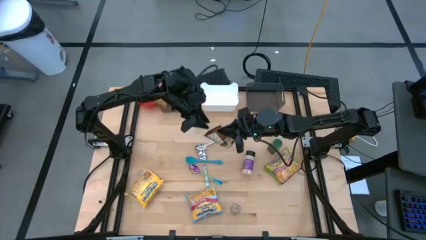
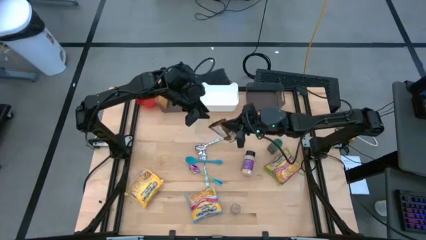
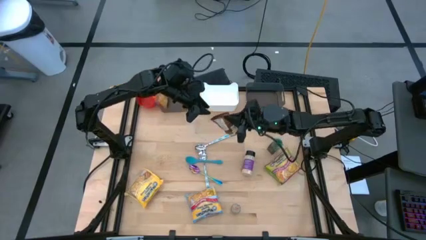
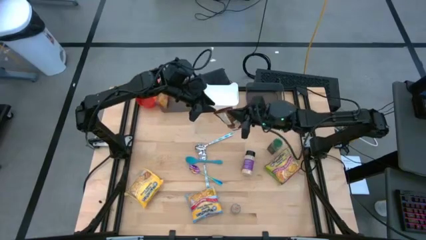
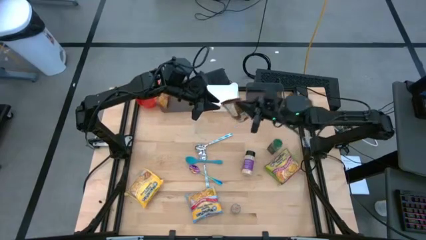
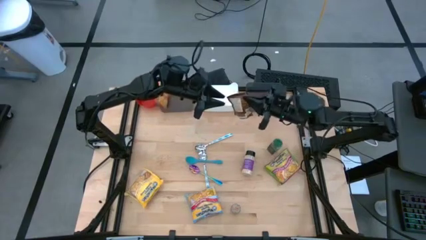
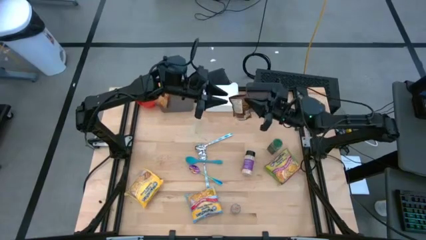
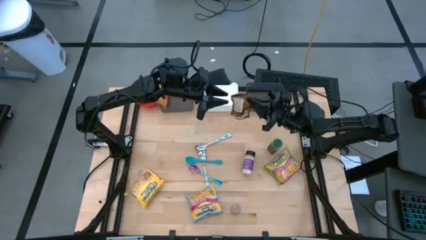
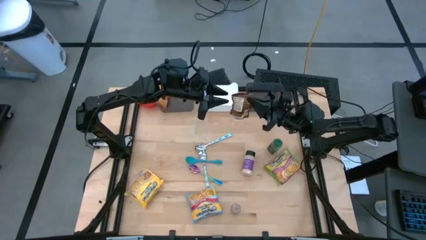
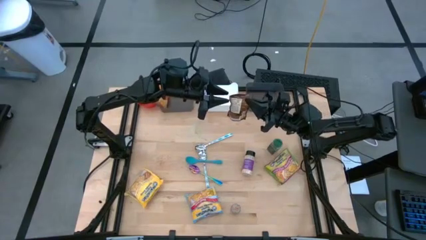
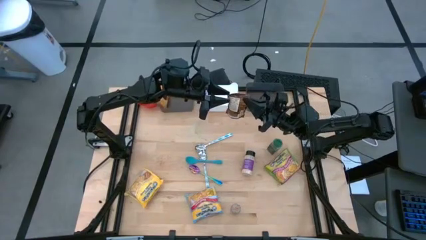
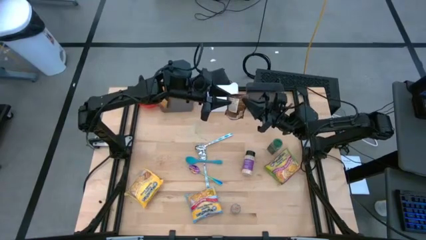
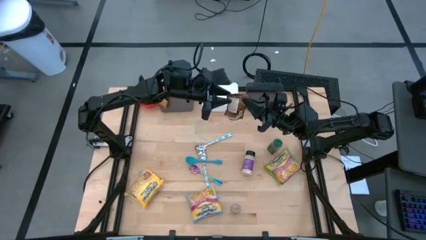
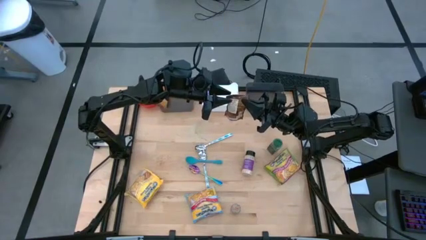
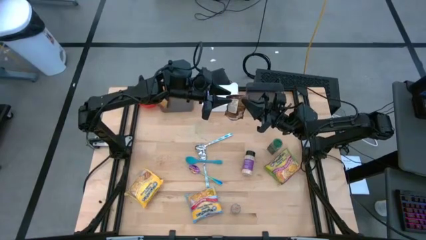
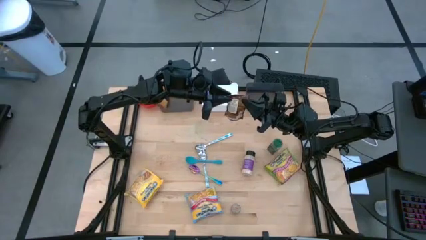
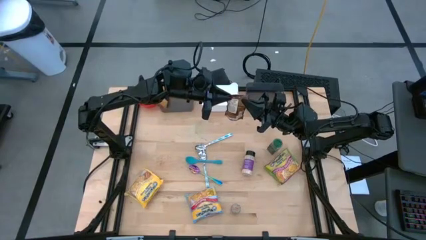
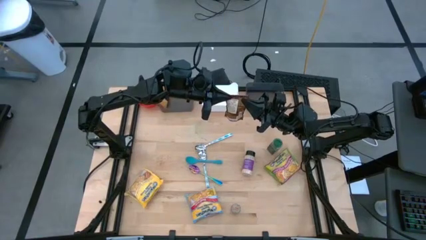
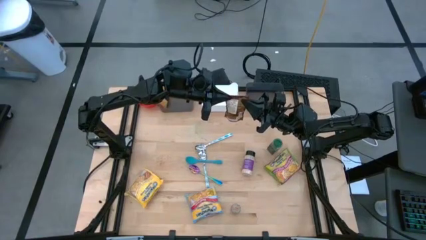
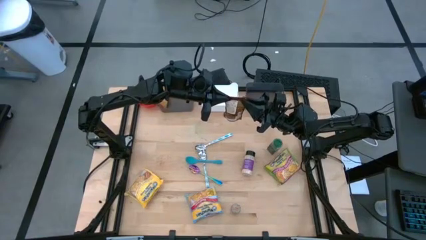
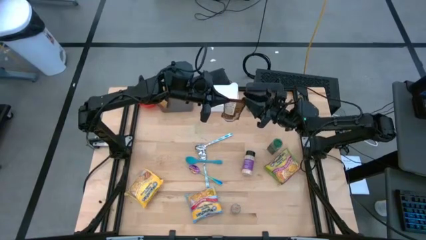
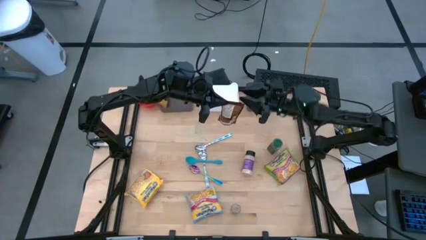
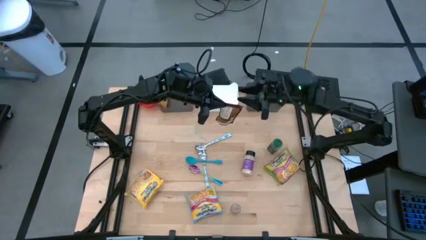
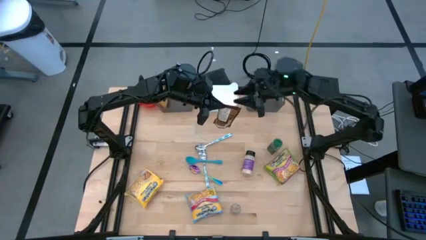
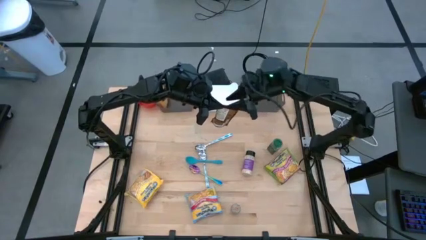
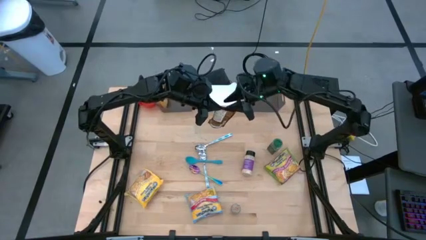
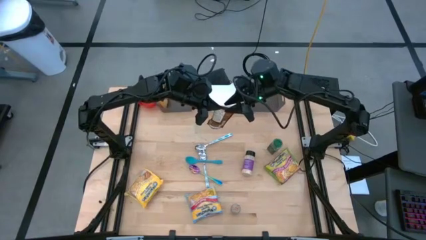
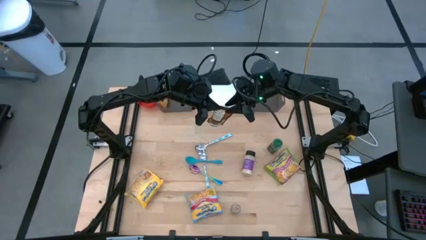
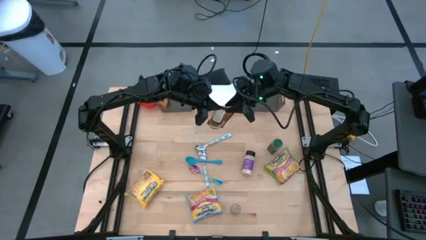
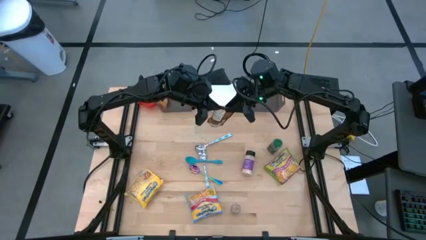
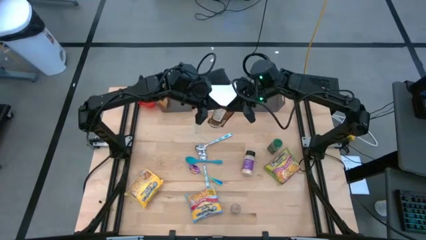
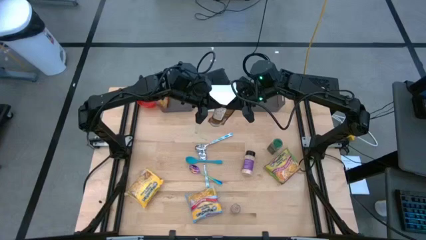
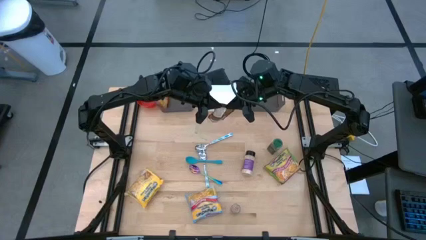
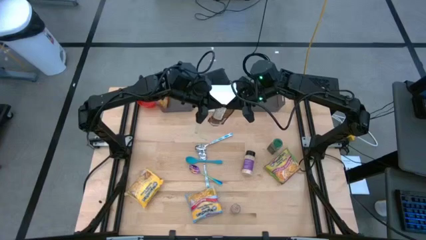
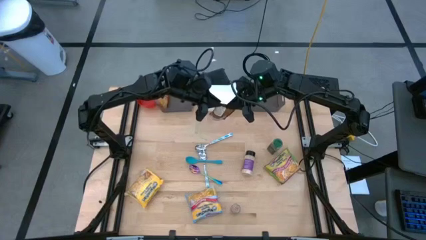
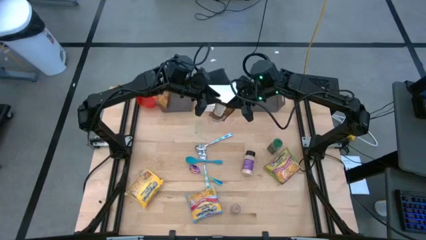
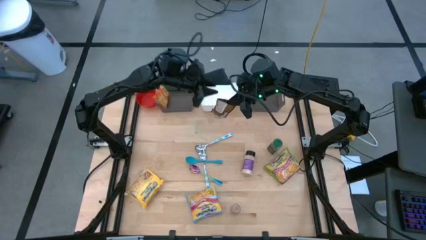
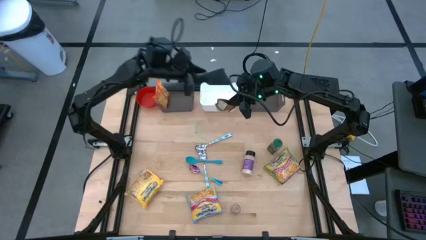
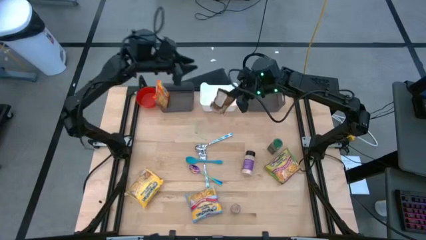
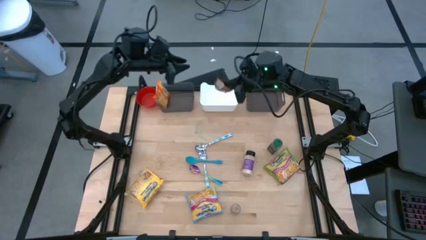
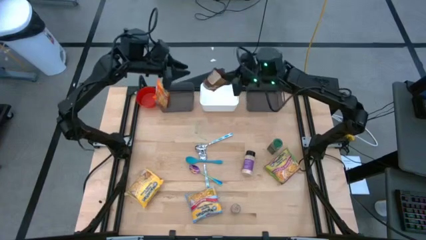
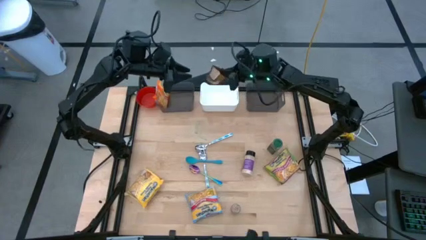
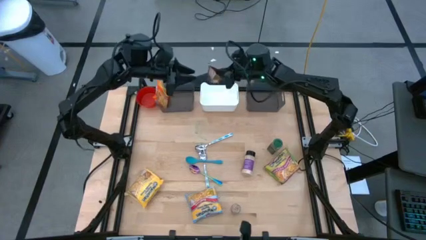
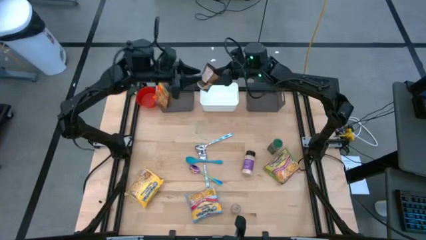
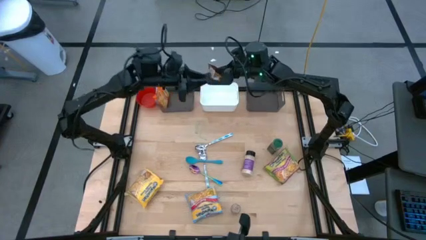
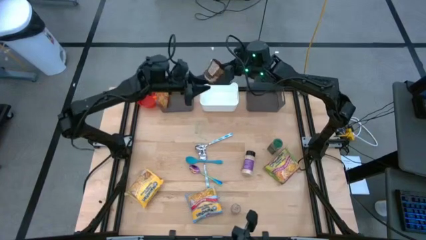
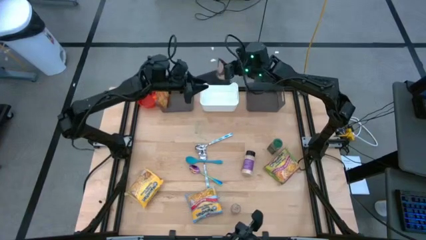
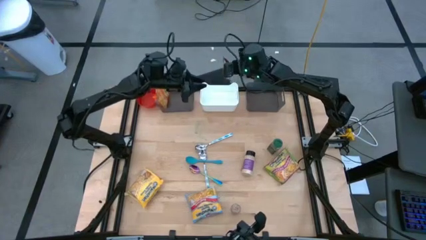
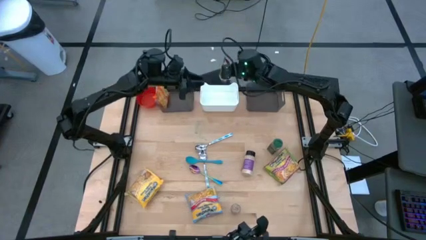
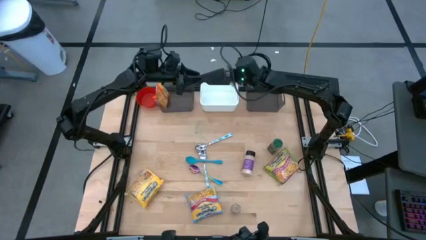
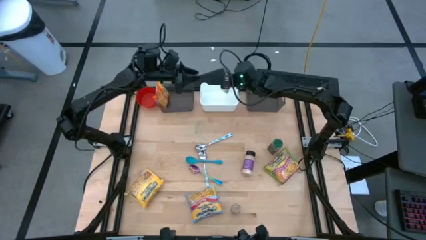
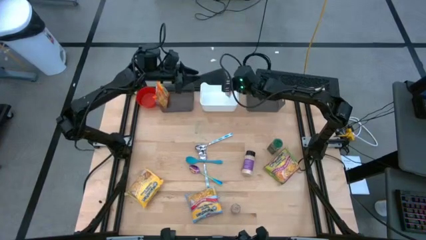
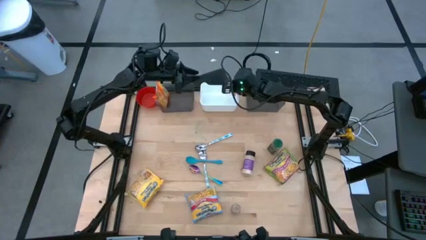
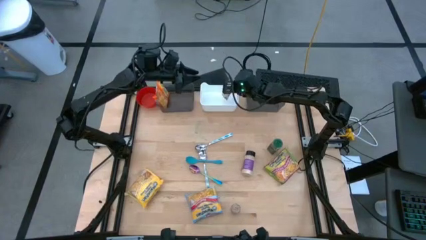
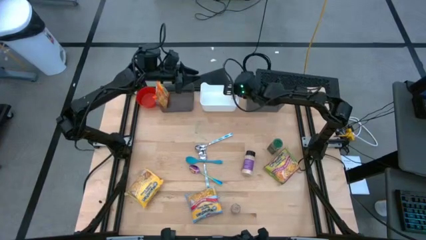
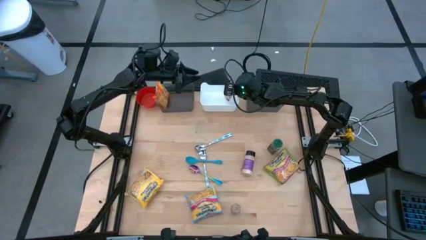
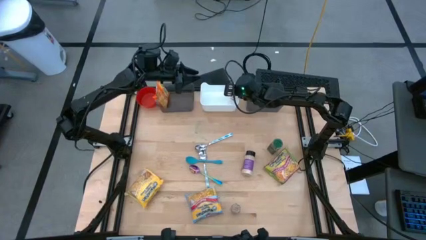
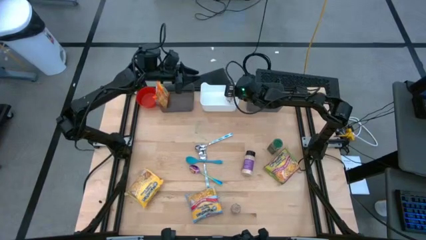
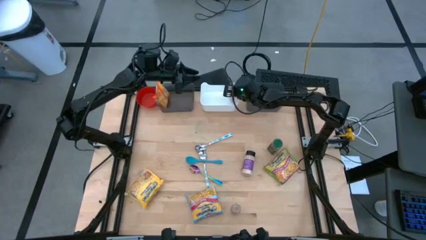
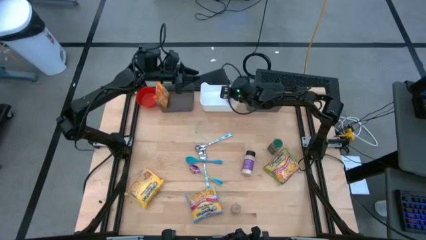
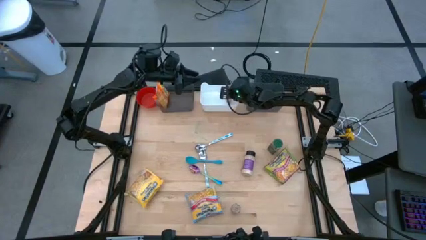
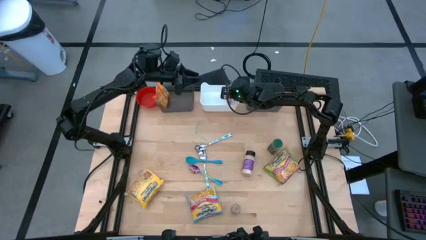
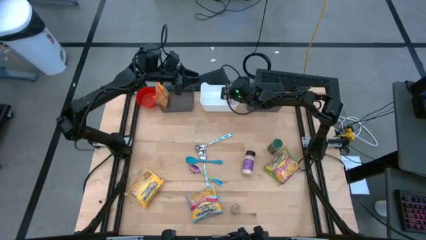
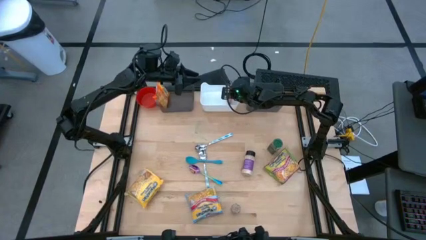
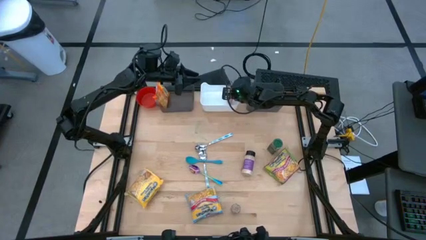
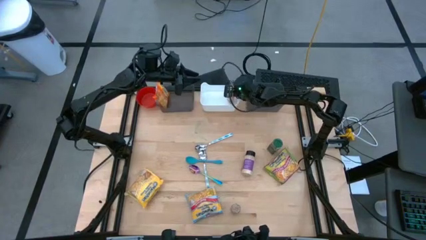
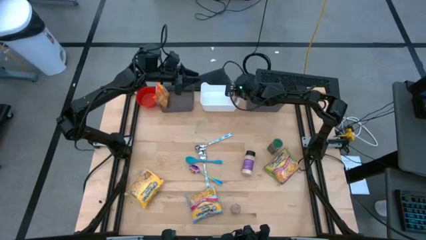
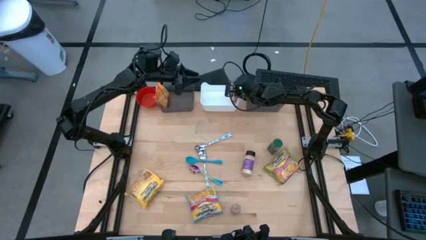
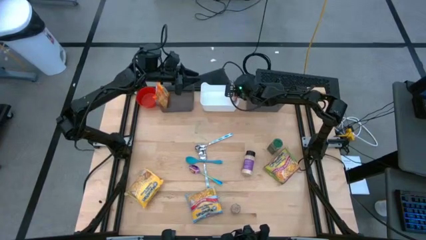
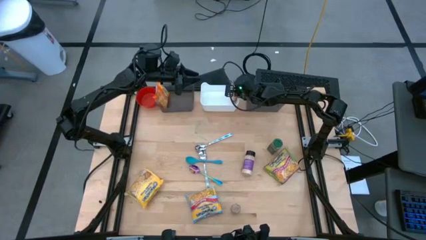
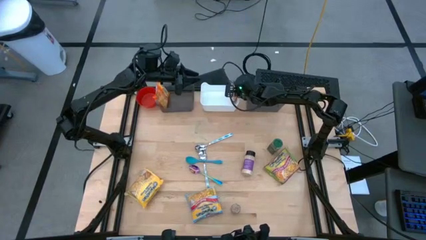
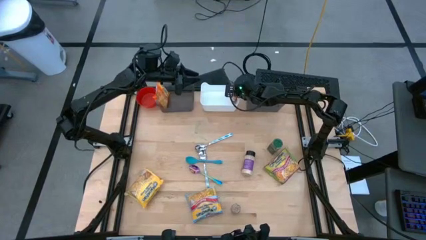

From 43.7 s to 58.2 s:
Task: Pick & Place Food Item
Put the orange seasoning pack into the white bin
